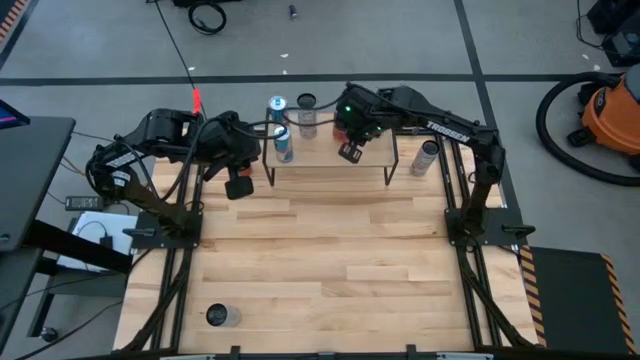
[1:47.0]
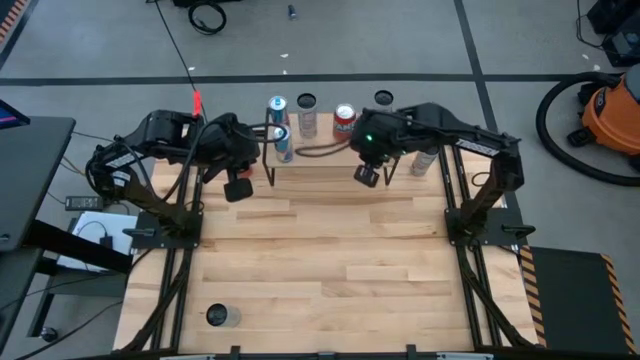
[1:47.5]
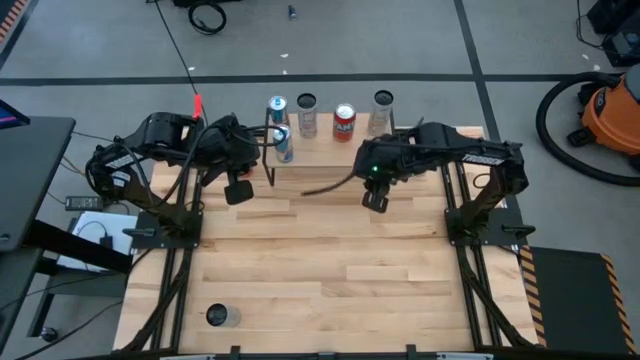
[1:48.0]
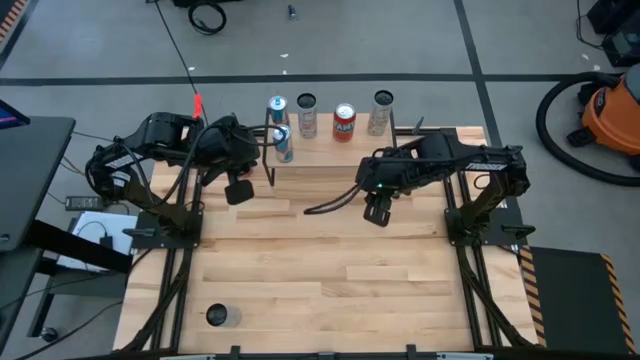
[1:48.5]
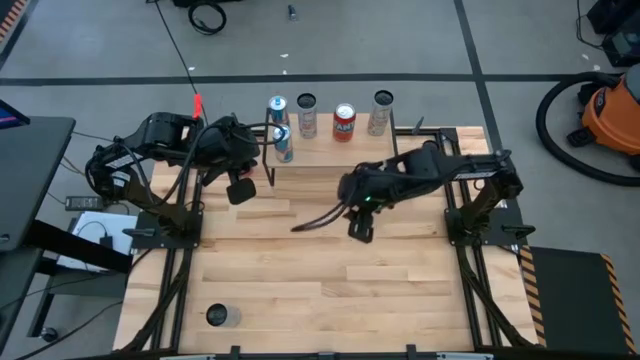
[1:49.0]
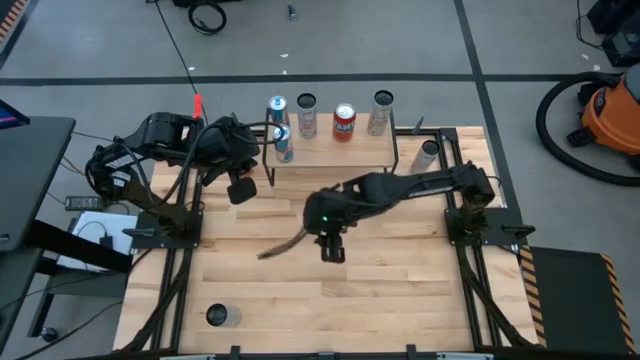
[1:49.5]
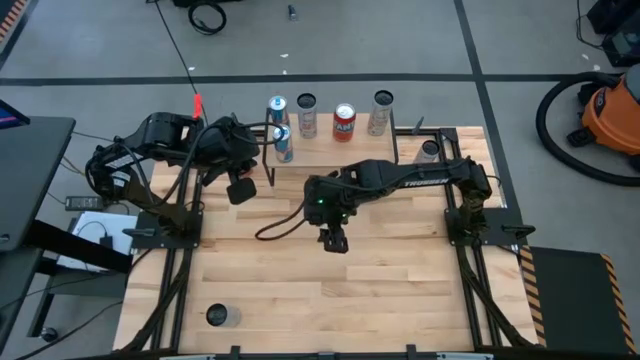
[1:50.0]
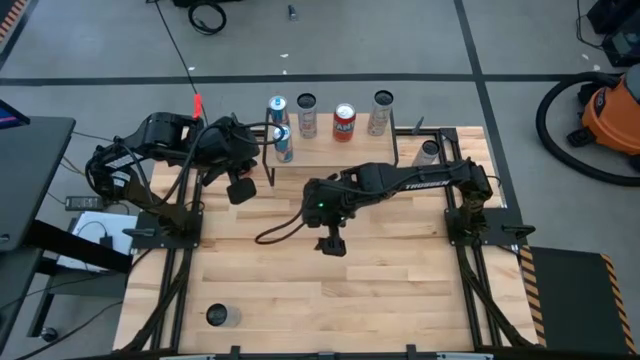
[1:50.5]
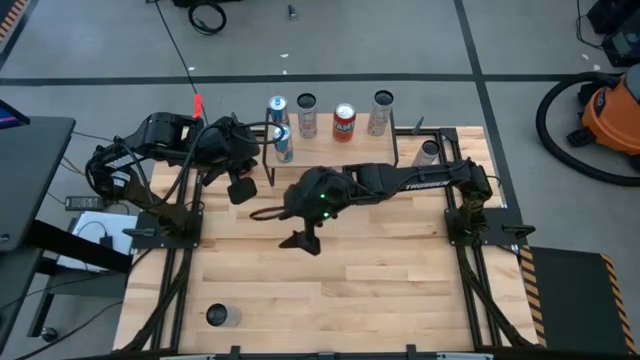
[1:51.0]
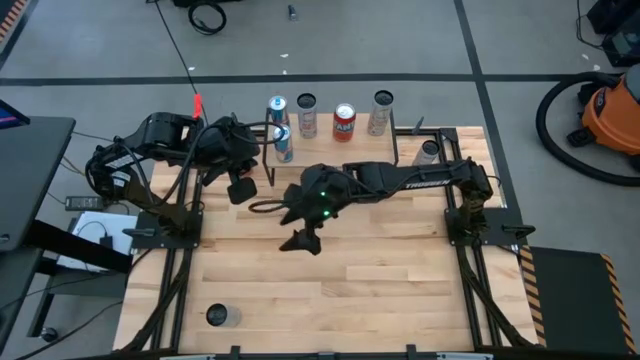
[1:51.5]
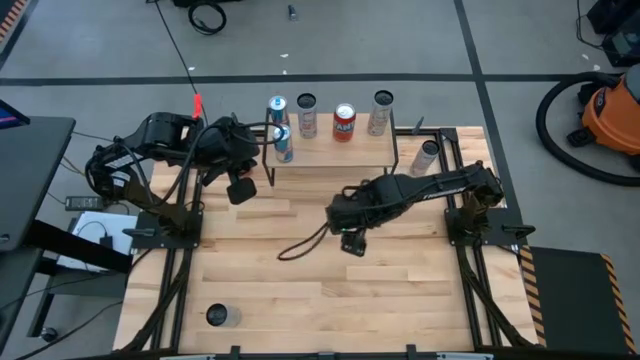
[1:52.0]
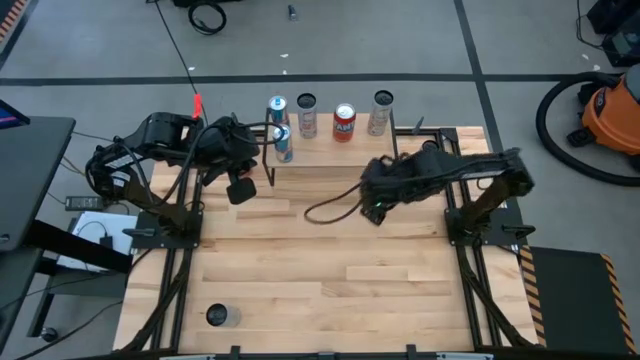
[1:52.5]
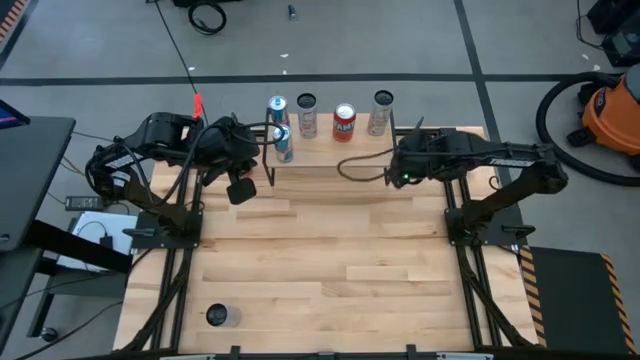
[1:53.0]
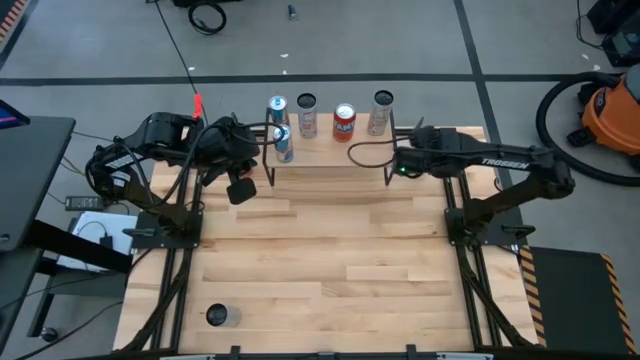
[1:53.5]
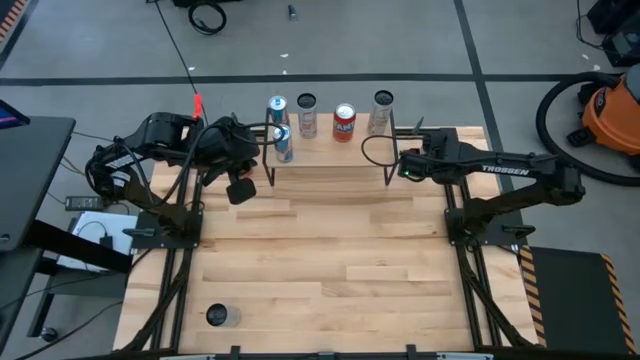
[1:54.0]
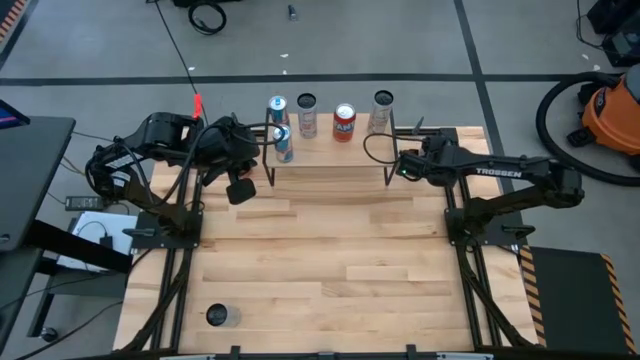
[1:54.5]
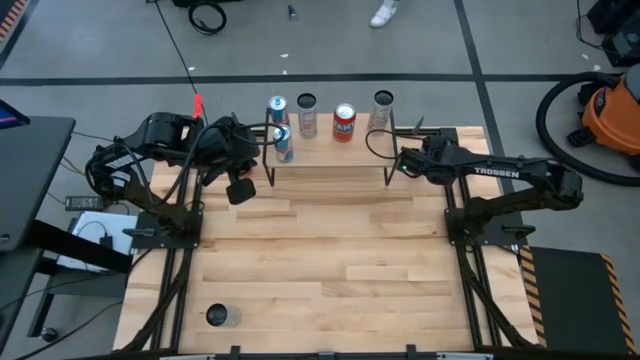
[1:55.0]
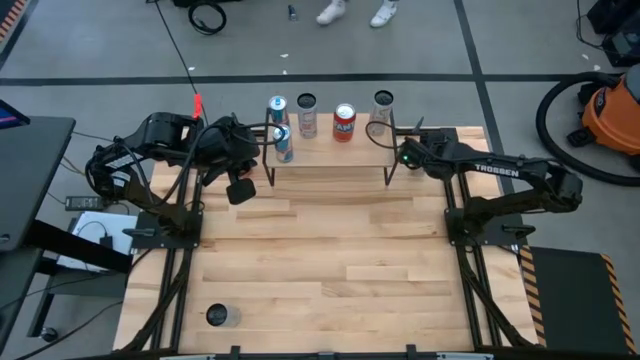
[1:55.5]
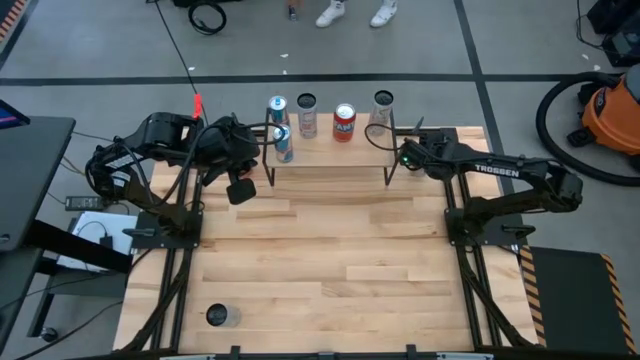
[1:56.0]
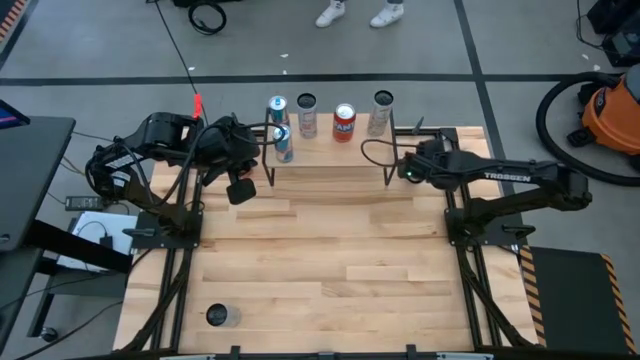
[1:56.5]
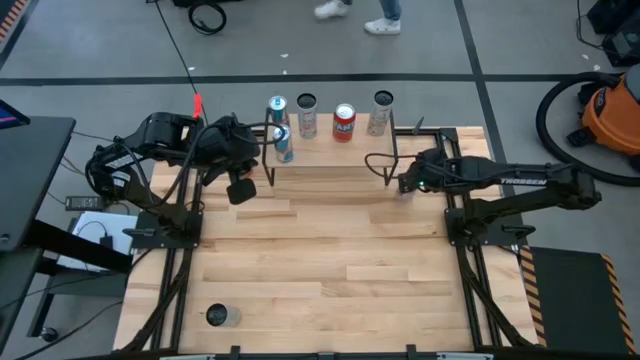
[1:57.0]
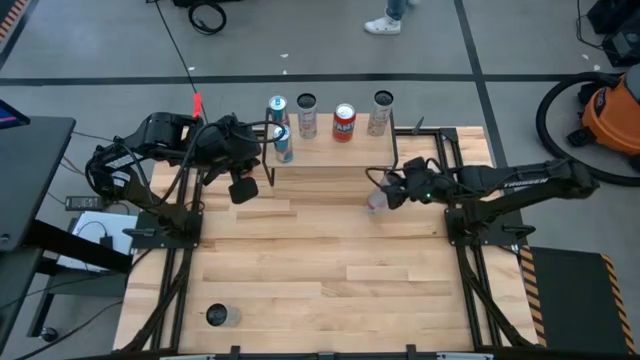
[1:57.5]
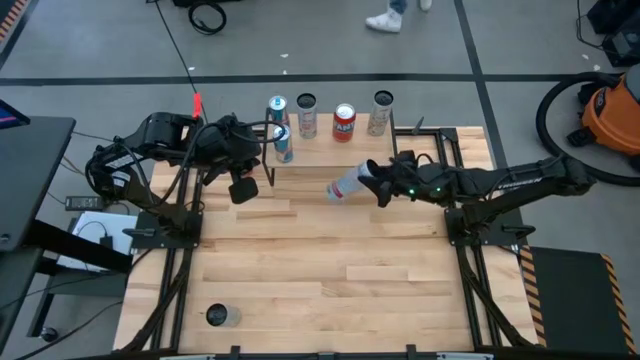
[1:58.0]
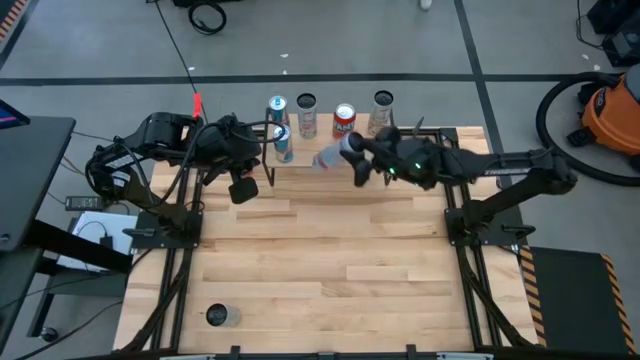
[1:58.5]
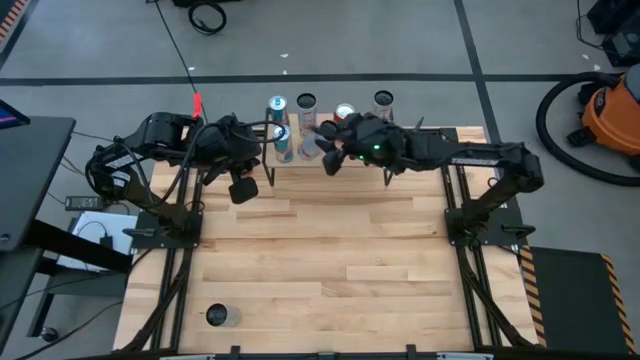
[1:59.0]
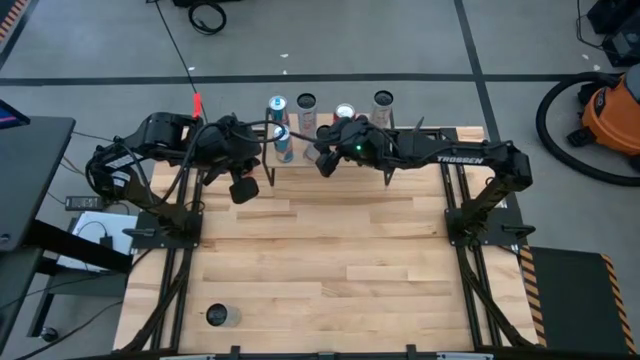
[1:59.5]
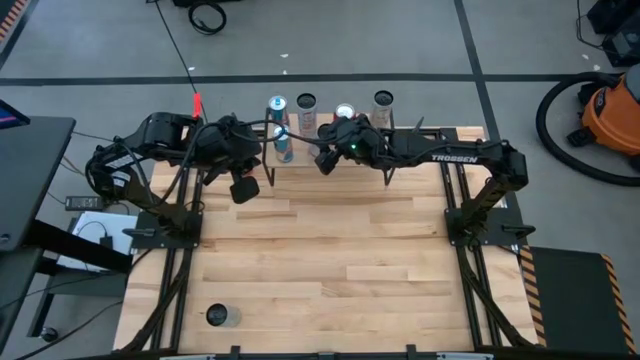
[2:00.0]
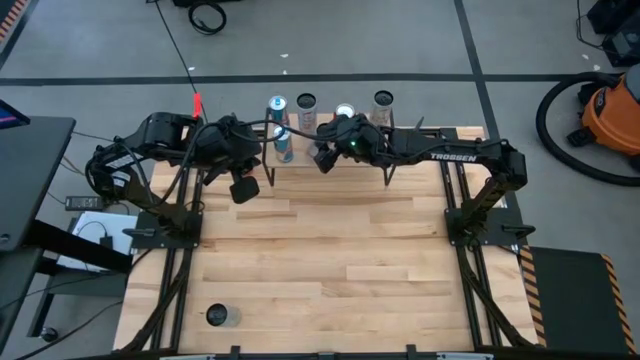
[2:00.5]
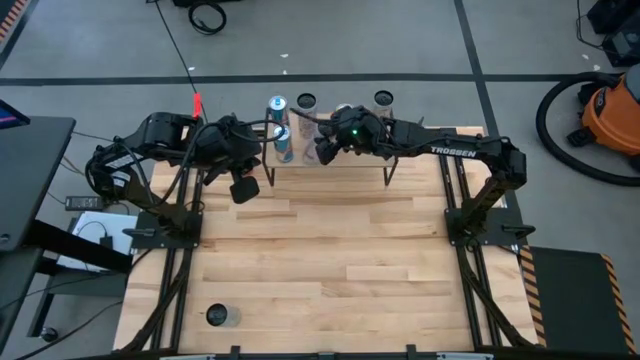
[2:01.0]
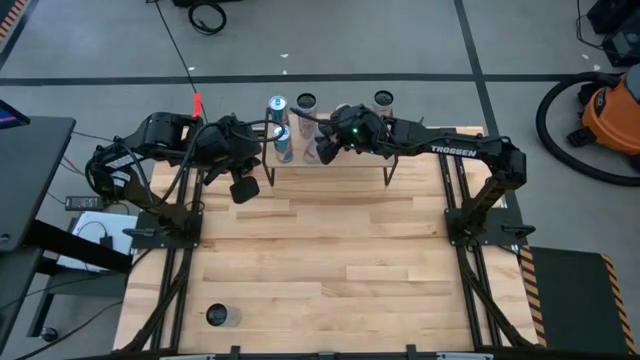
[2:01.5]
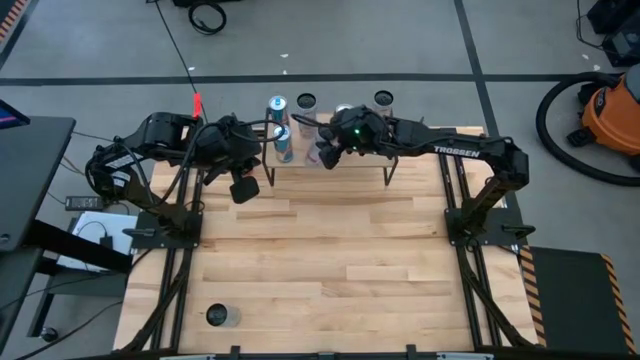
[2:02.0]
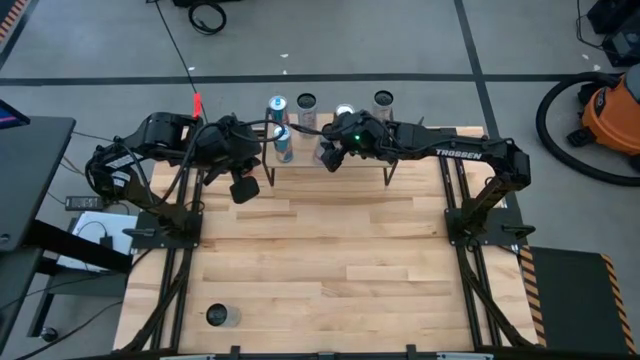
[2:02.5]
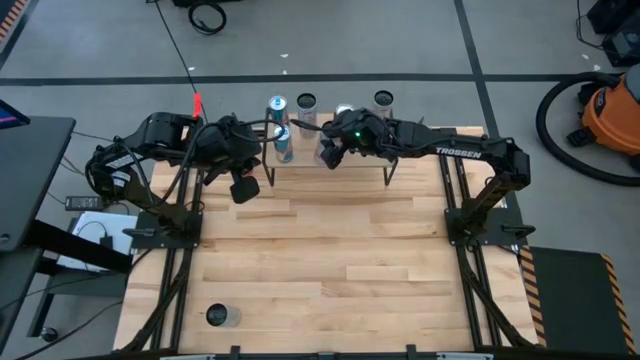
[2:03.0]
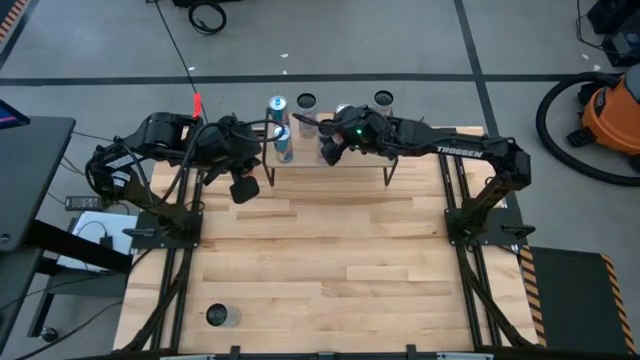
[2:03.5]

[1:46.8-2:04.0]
Task: Place canned beverage on shelf
Put the white pink soda can on the shelf aligned with the other white pink soda can

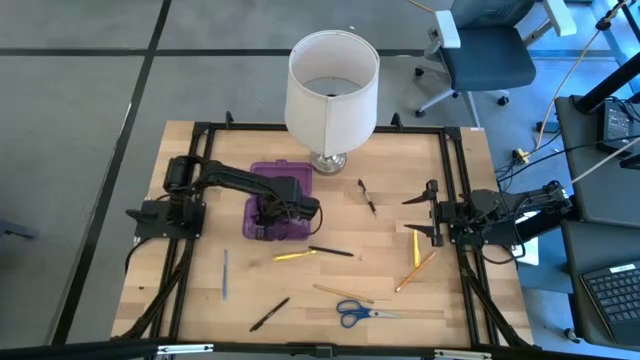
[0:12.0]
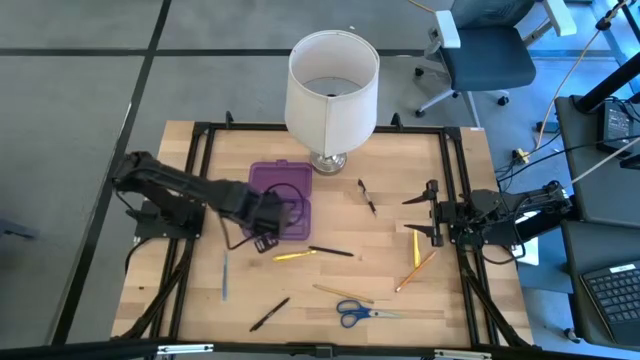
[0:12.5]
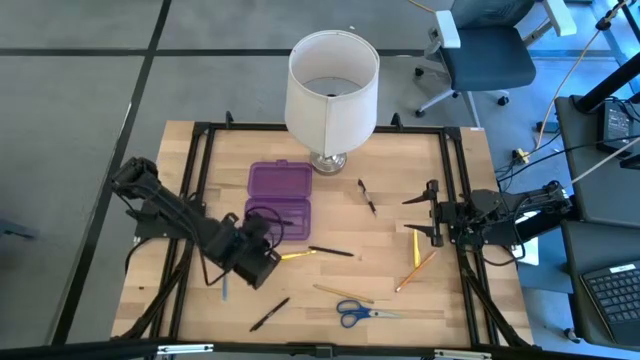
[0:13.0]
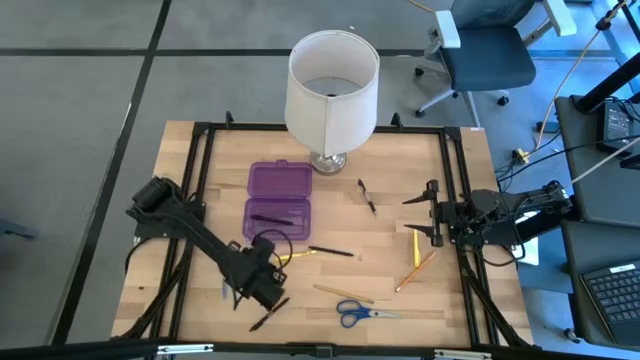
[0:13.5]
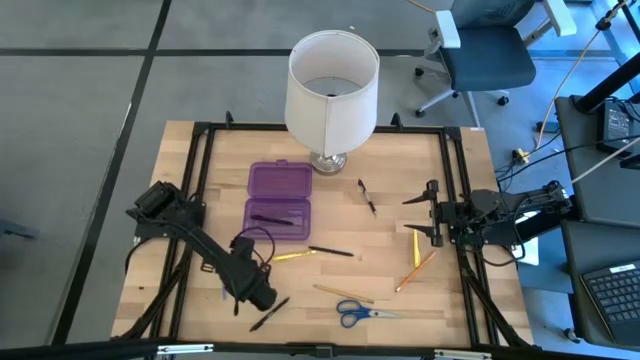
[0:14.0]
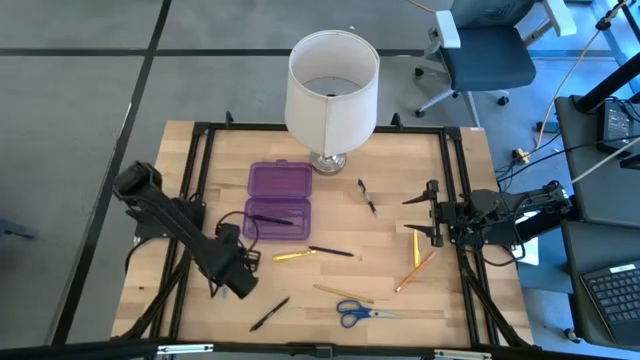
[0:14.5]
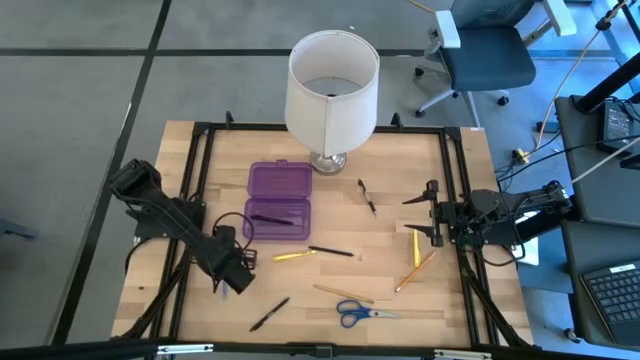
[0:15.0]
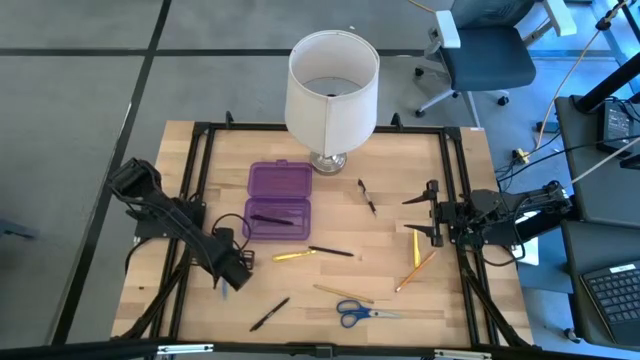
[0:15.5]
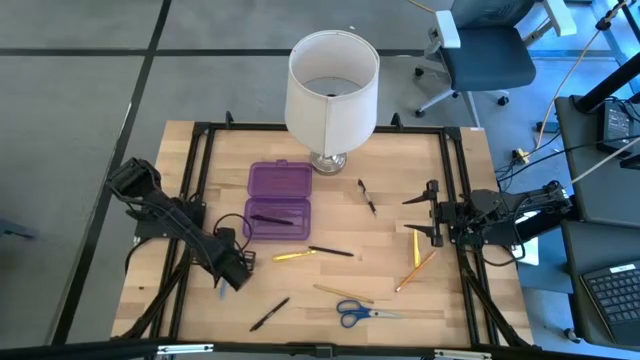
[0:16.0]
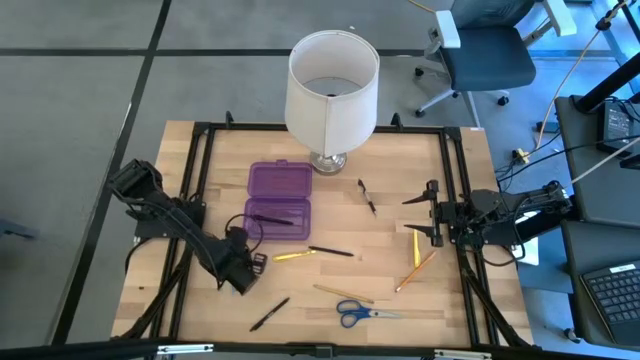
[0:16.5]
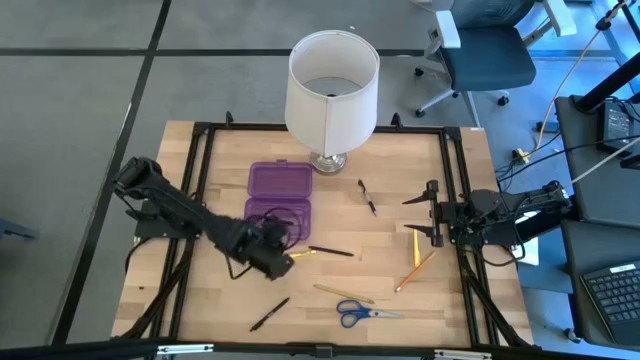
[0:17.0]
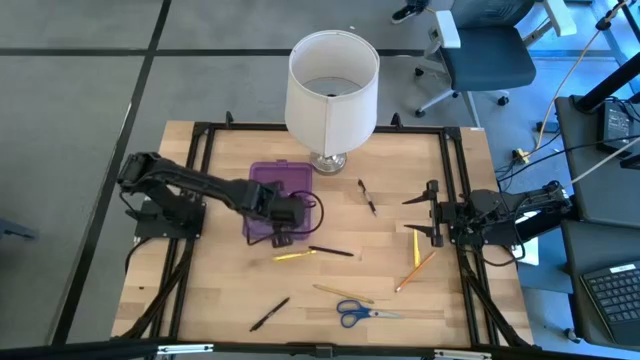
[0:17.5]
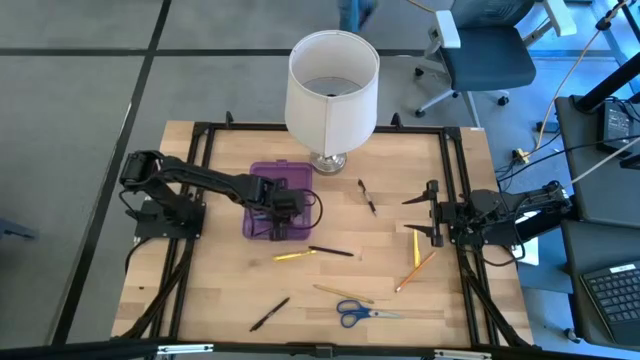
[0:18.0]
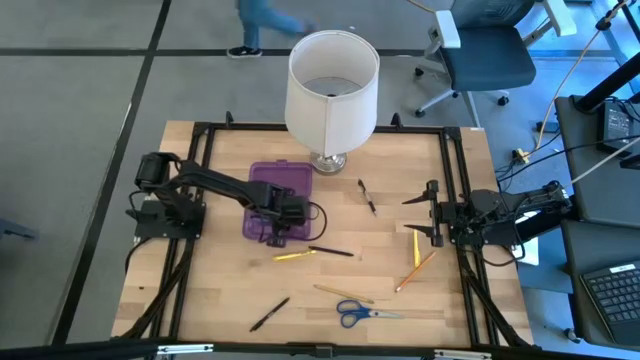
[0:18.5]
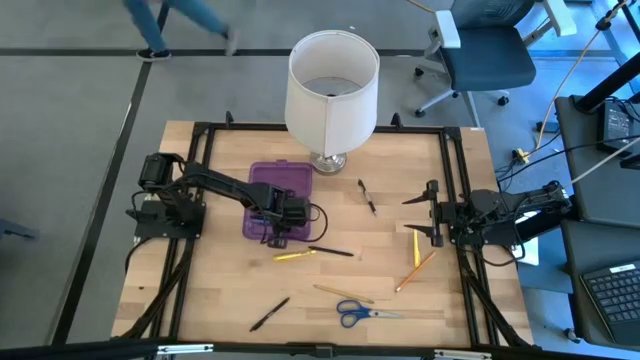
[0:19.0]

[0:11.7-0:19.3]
Task: Pick & place school supplies into a supply box
Put the blue pen into the purple supply box
